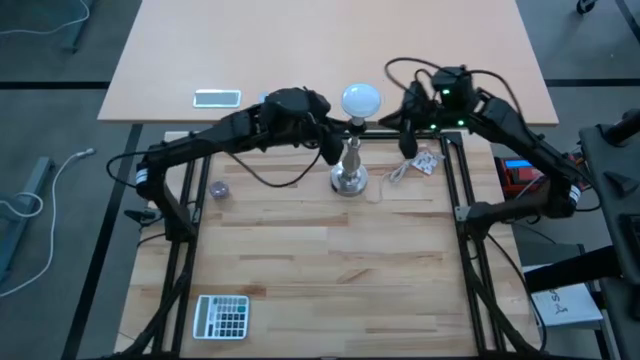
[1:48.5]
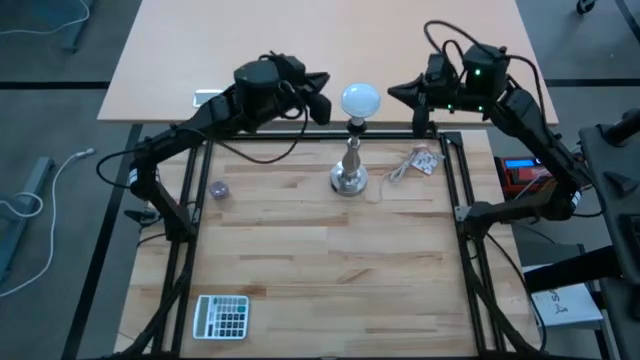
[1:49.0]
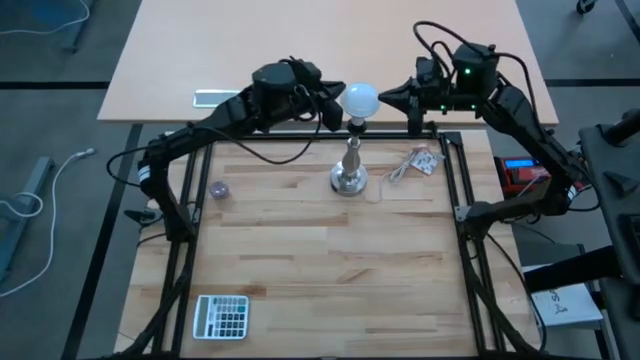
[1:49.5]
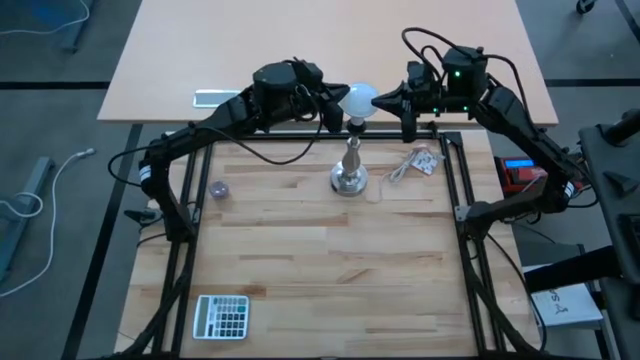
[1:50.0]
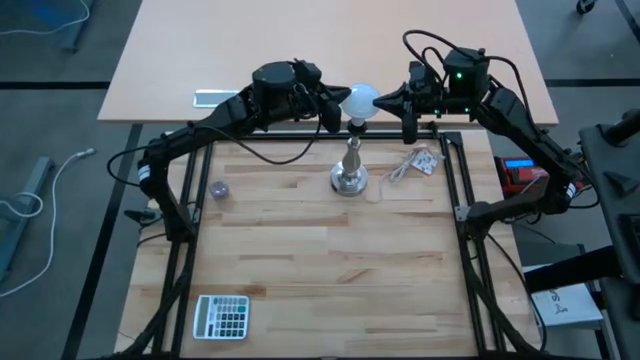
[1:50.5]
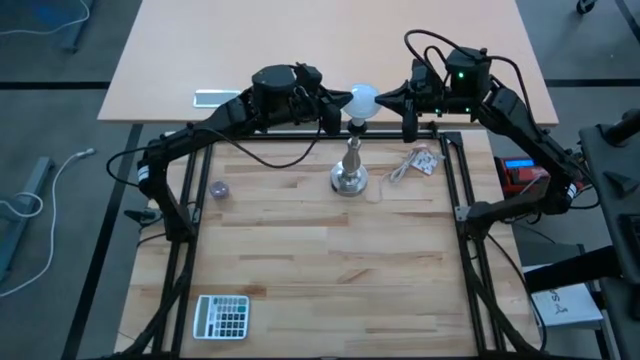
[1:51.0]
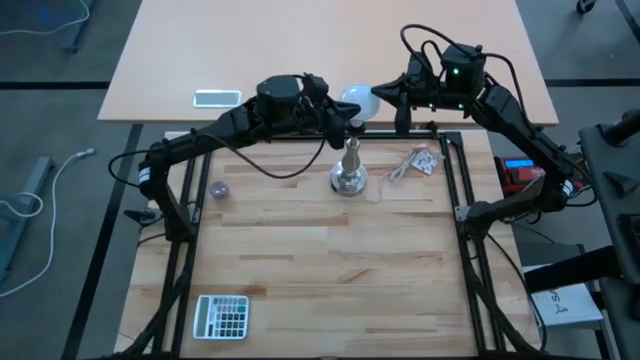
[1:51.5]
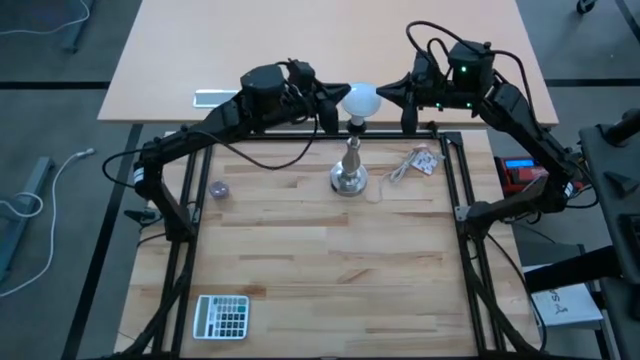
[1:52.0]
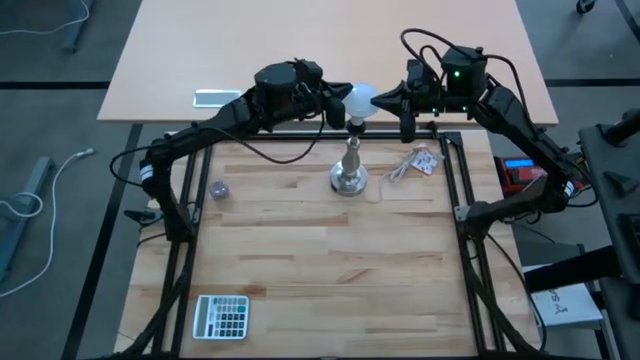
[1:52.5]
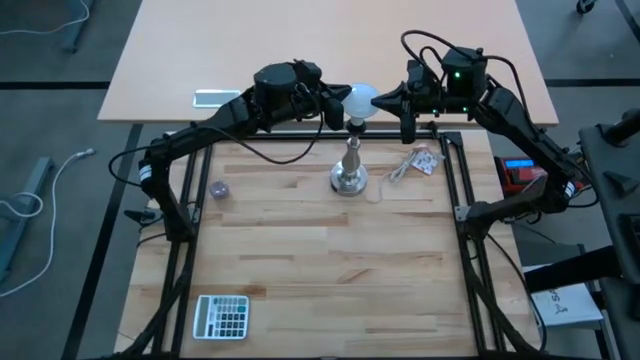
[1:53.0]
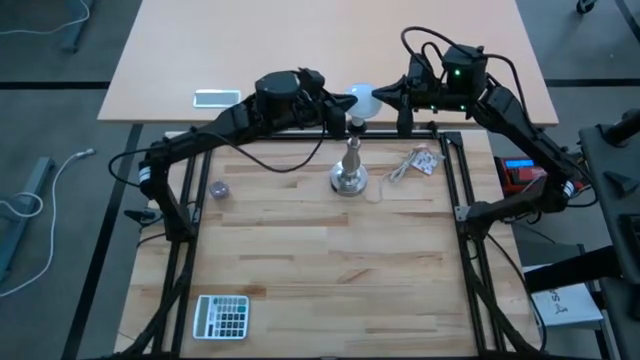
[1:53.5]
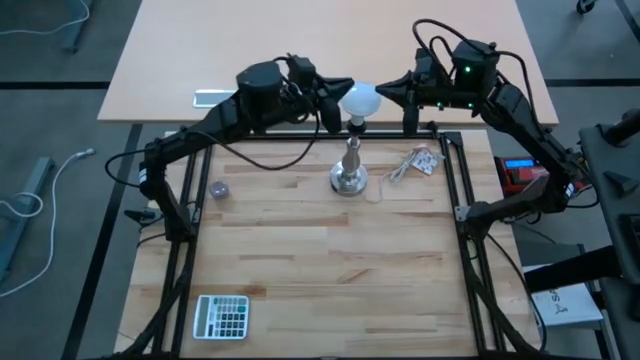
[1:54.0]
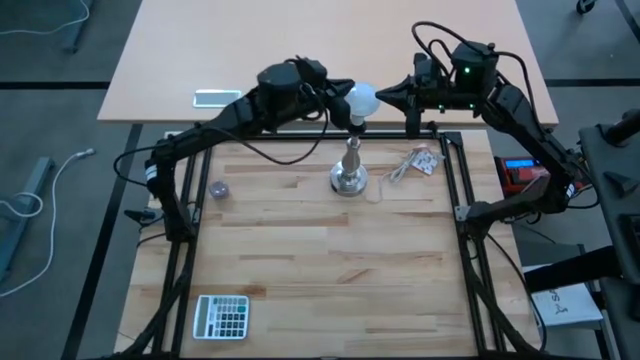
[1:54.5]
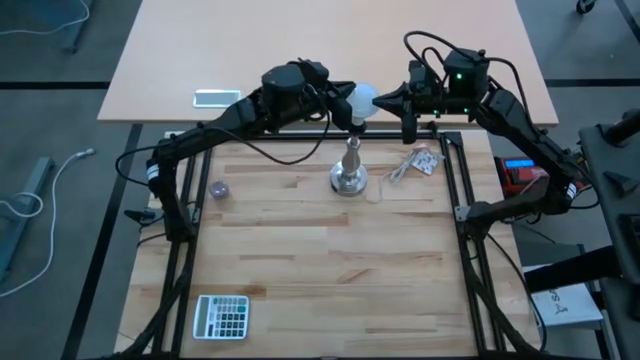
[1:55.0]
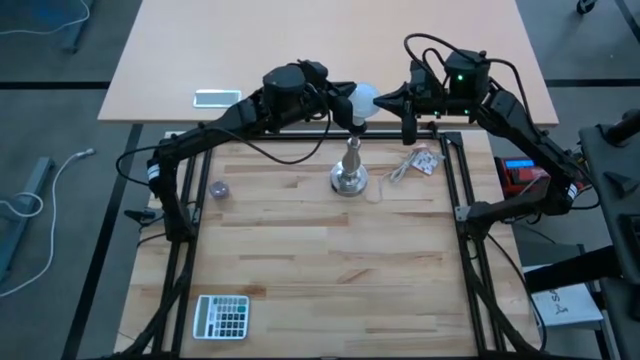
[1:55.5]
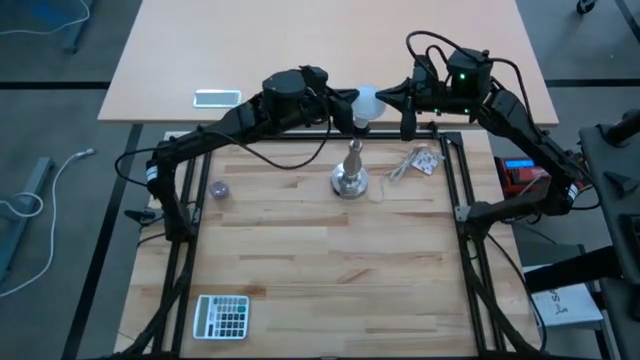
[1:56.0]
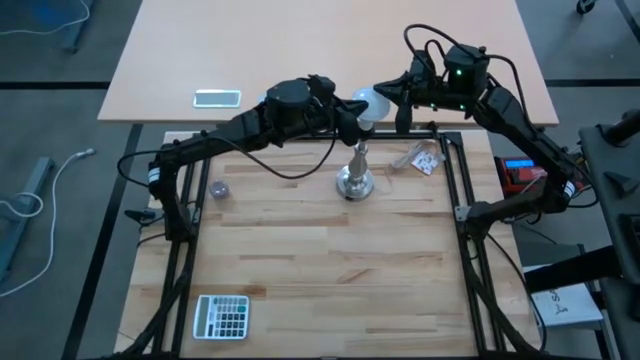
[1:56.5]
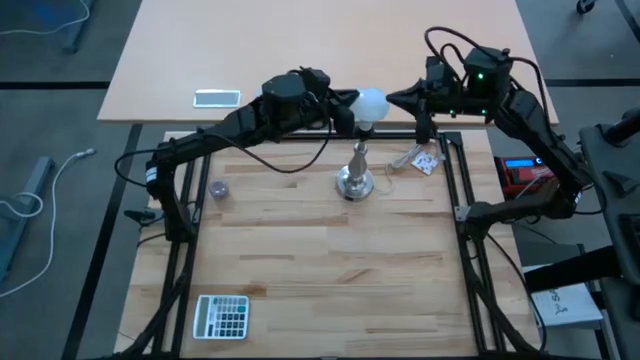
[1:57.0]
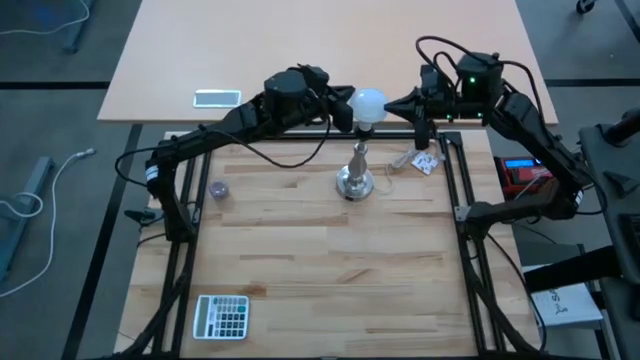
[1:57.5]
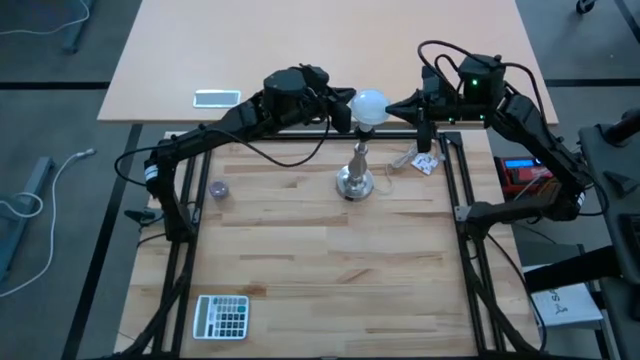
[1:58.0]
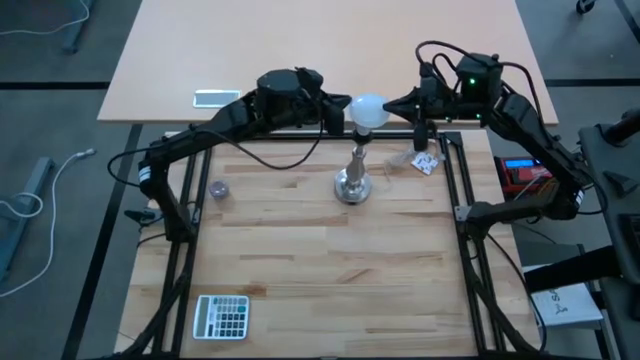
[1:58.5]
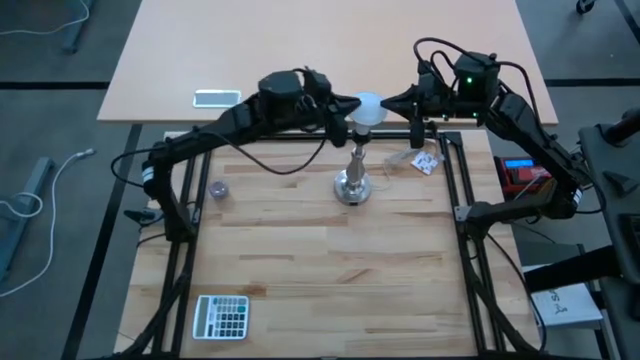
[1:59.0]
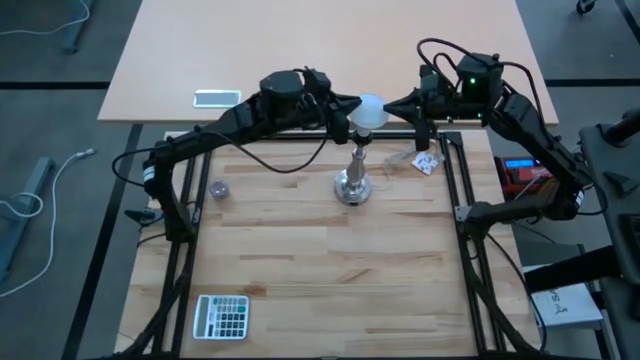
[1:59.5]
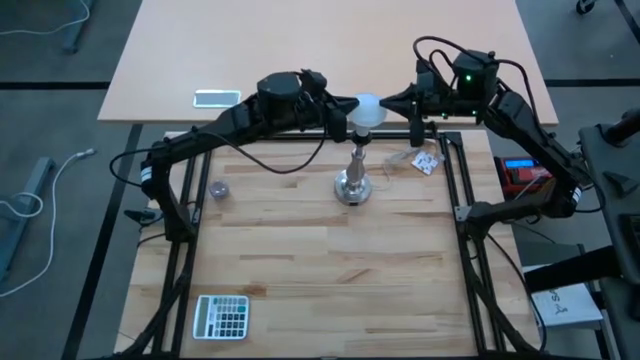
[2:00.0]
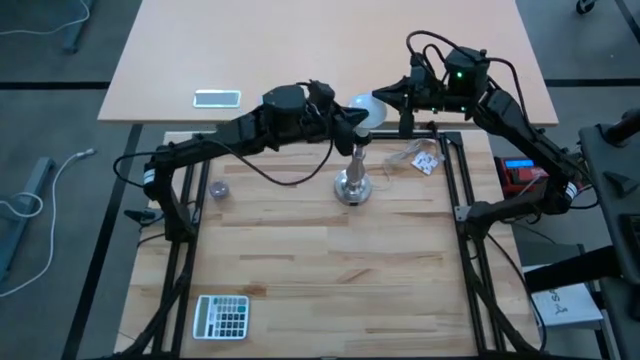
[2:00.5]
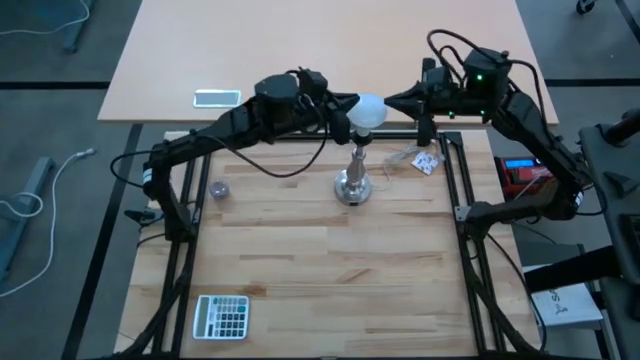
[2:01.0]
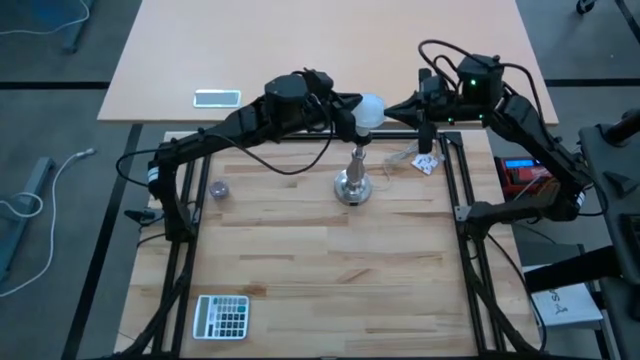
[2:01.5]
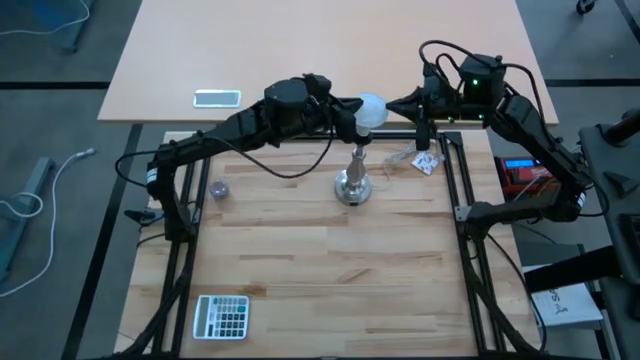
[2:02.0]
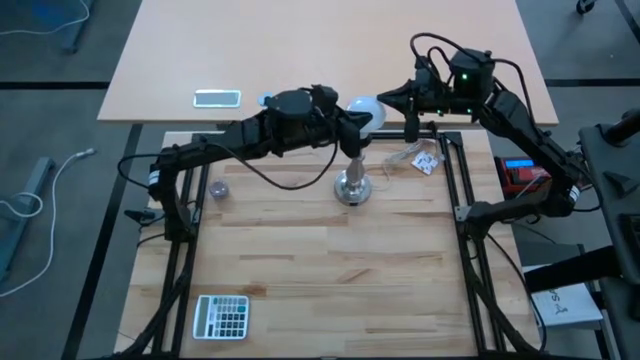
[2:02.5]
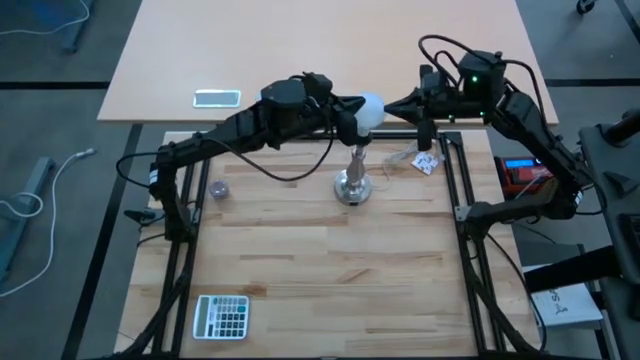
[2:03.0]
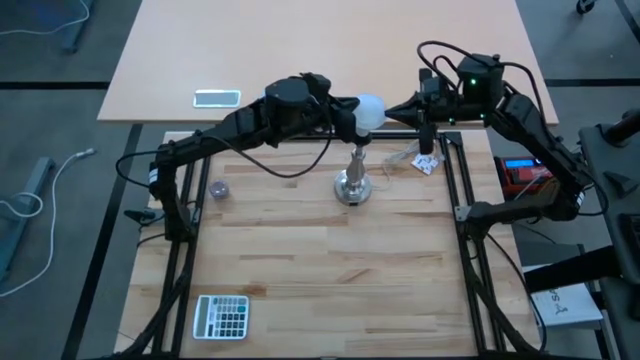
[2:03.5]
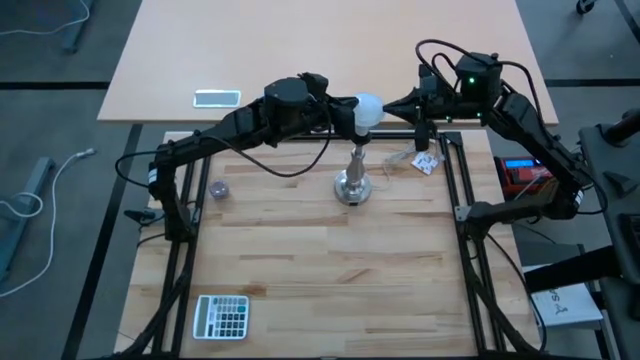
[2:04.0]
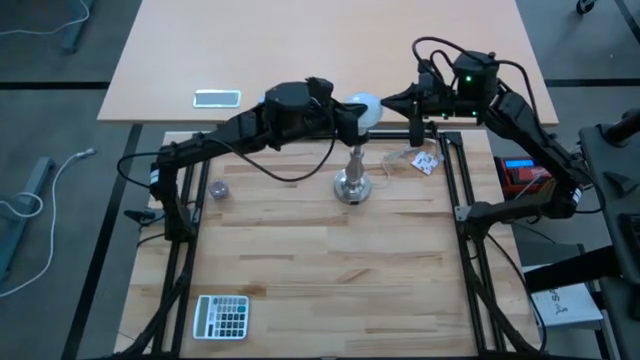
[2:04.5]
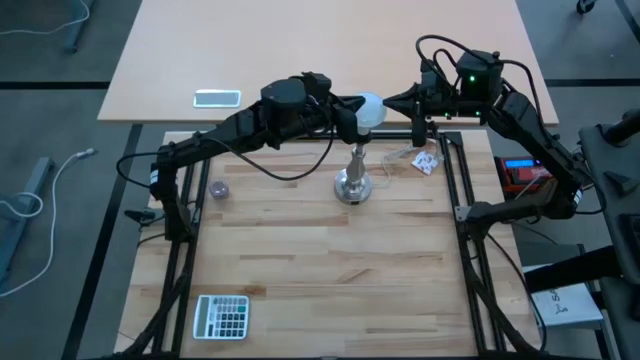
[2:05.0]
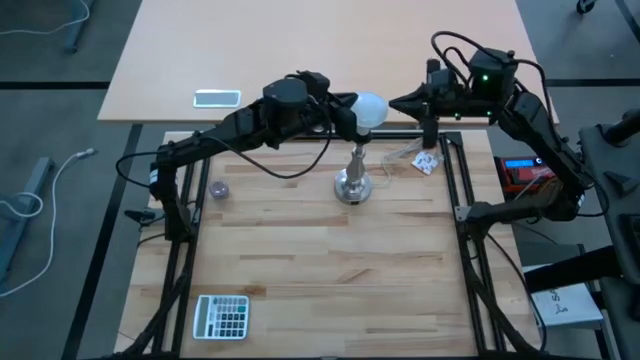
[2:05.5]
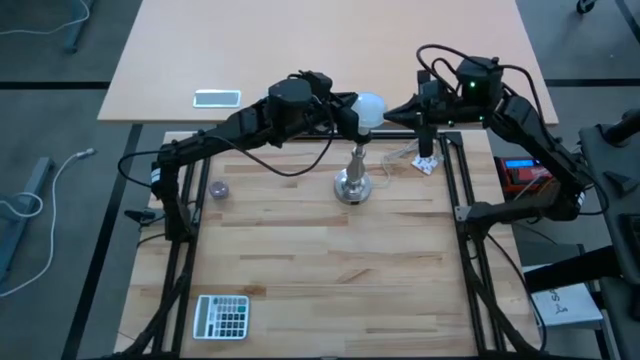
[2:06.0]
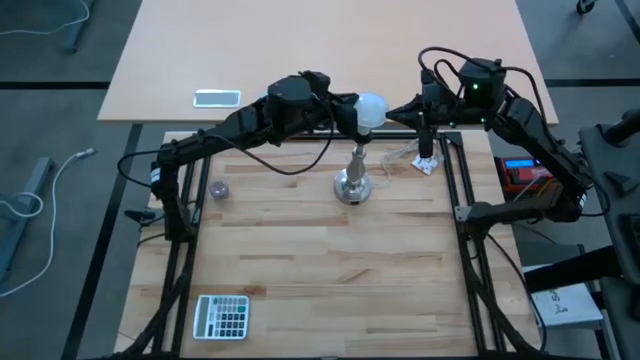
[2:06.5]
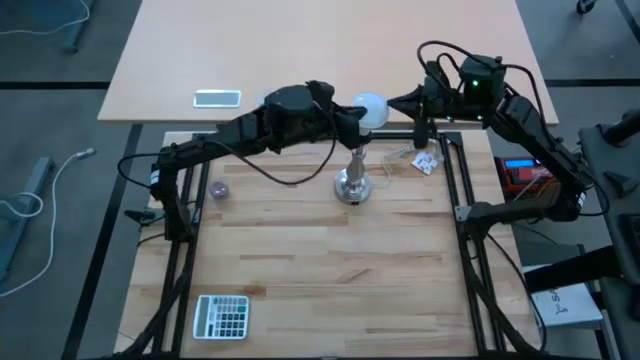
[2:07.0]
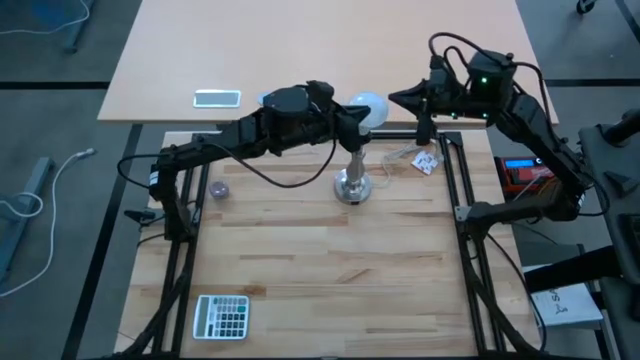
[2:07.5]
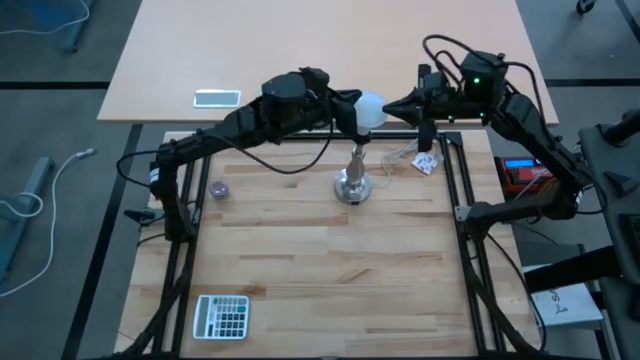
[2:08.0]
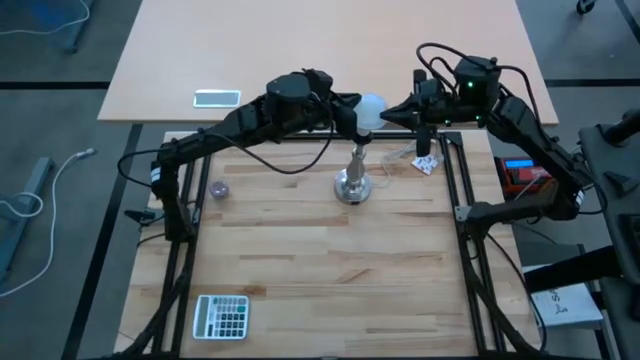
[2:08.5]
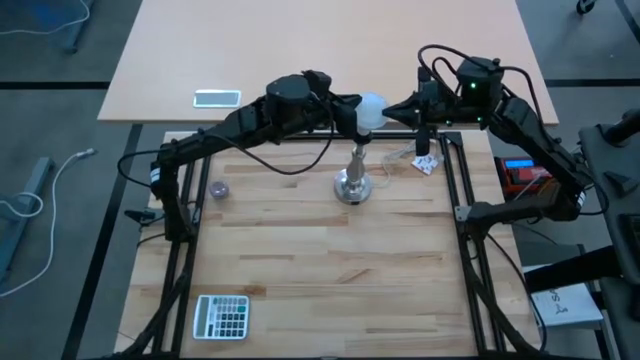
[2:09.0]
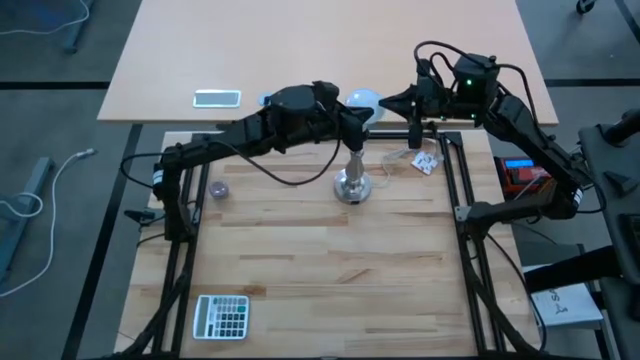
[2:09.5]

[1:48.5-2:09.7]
Task: Screw lightbulb
Remove the lightbulb from the lamp
